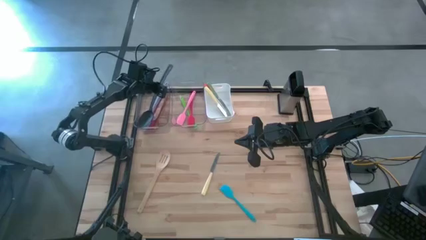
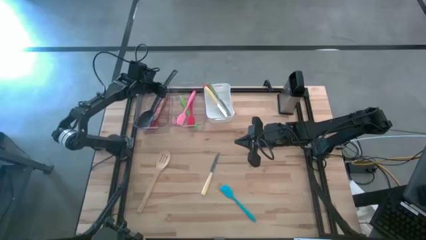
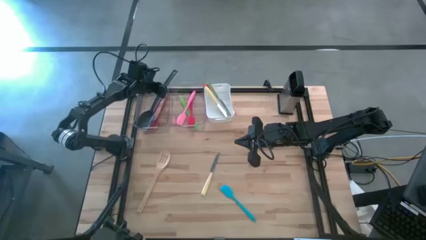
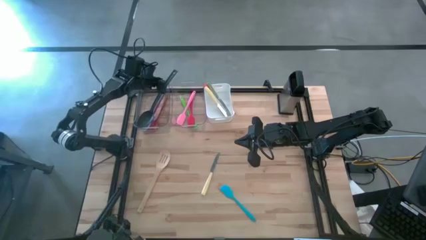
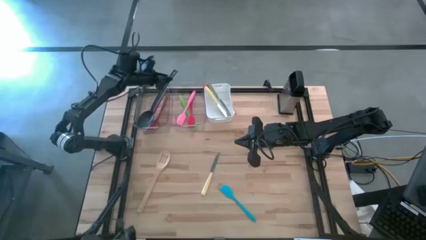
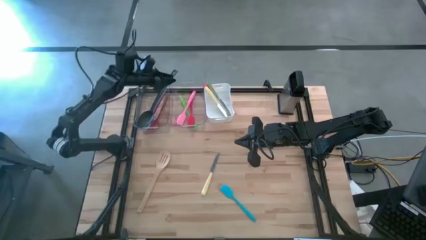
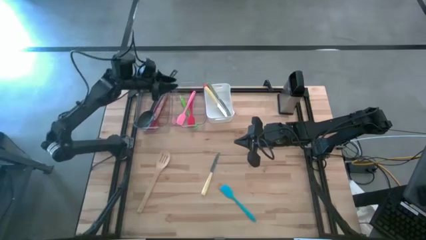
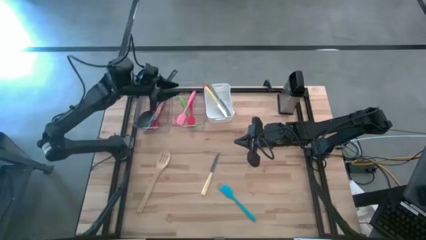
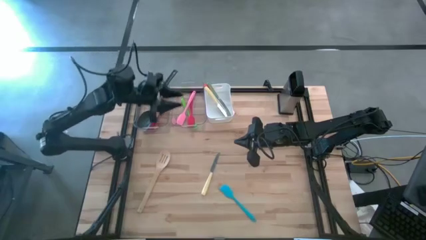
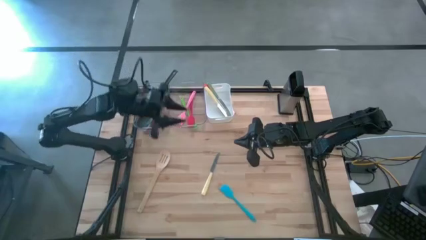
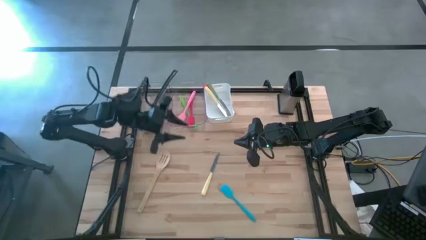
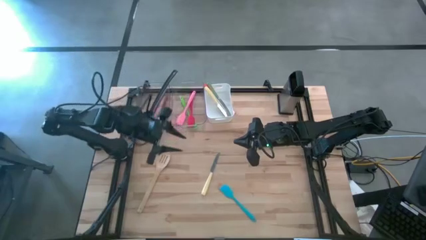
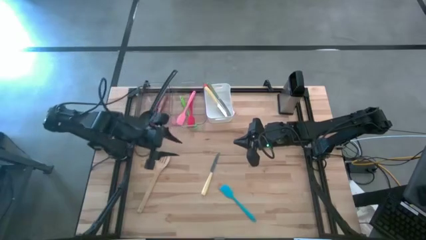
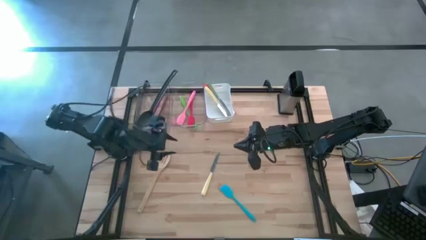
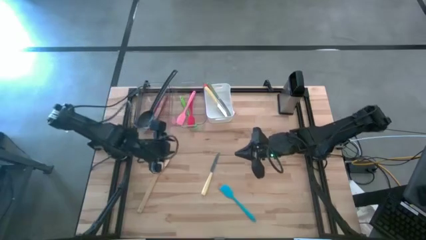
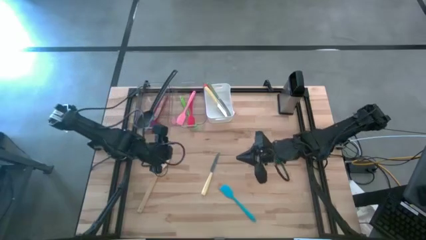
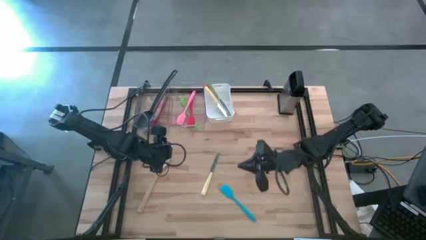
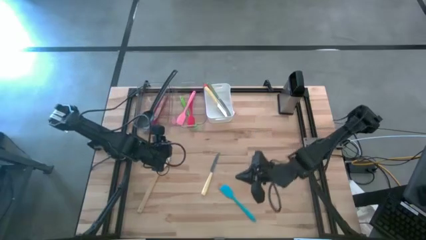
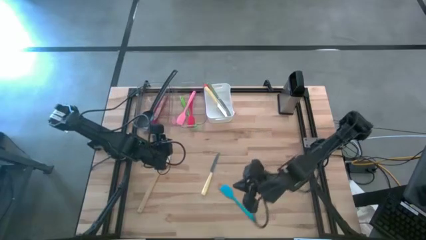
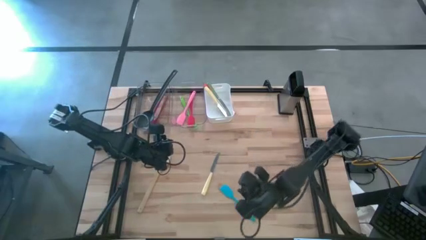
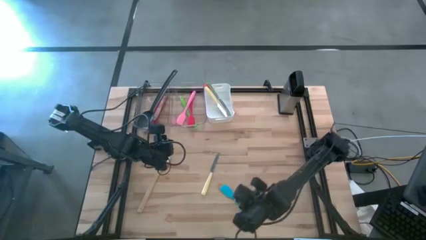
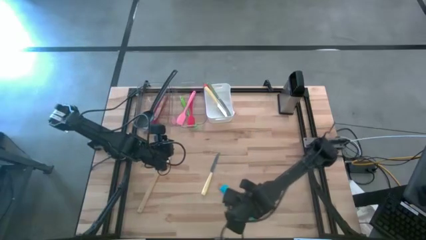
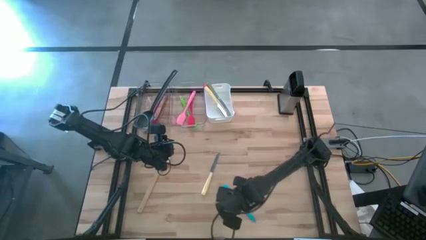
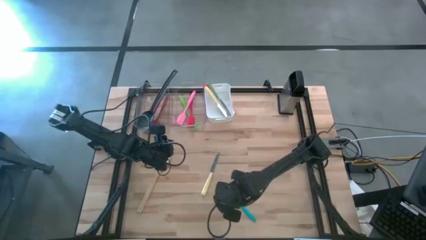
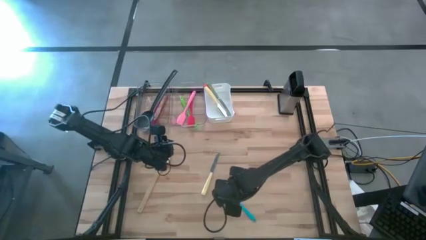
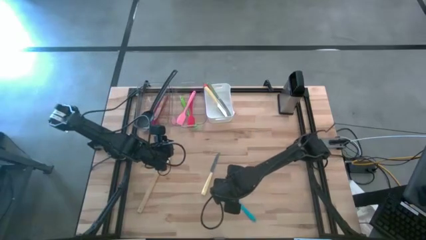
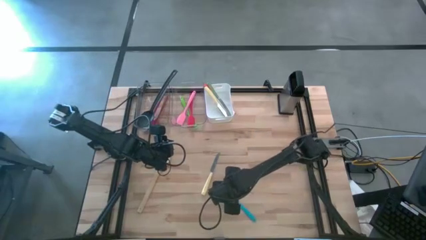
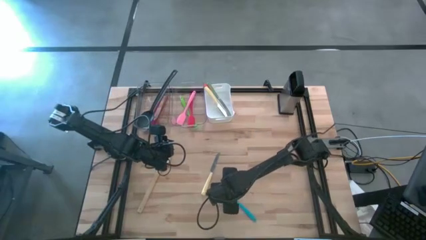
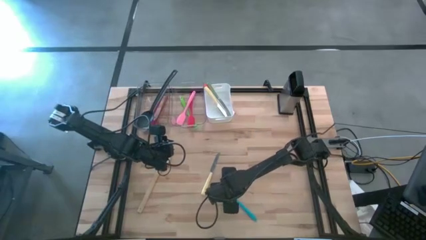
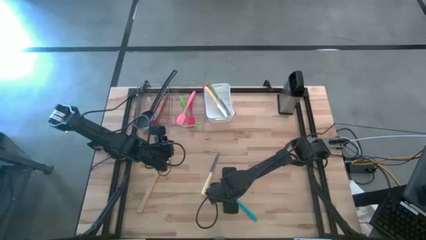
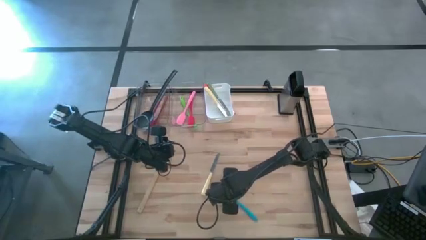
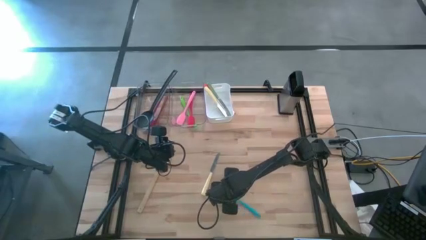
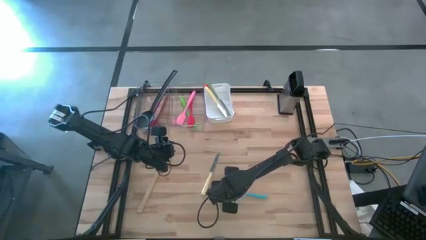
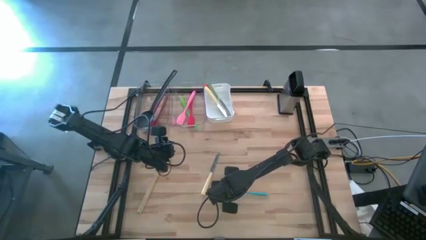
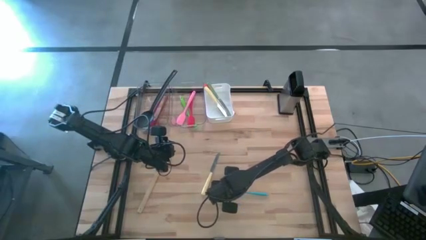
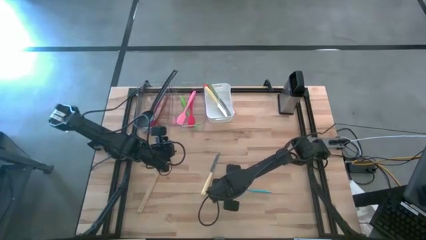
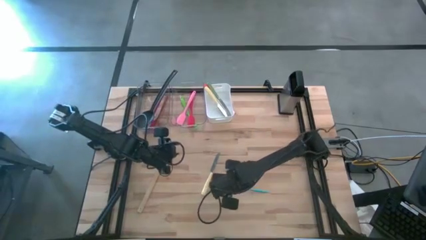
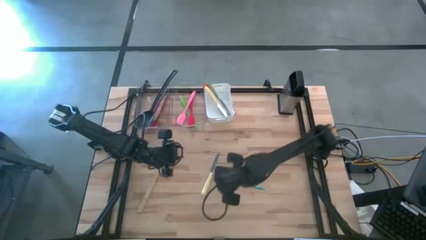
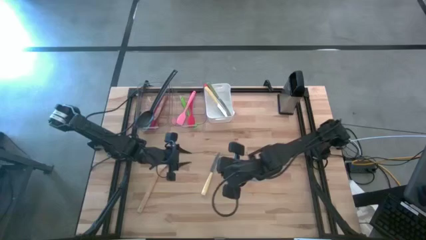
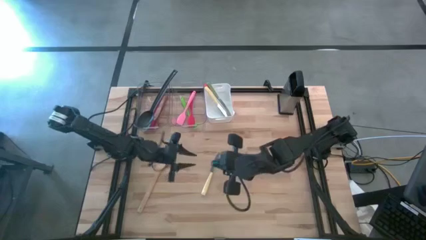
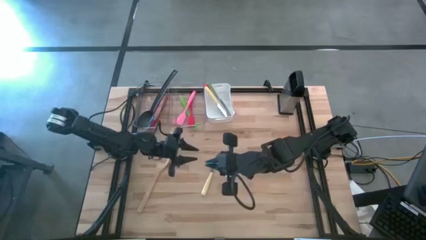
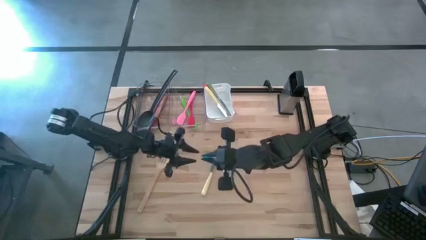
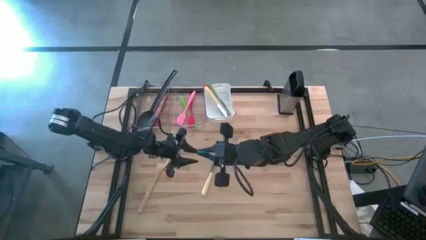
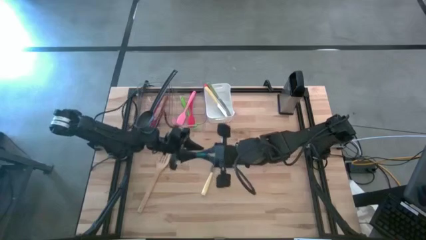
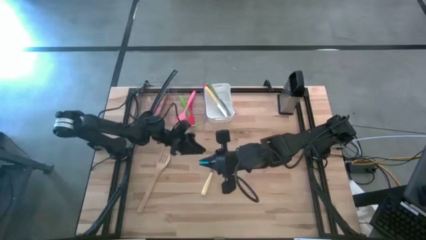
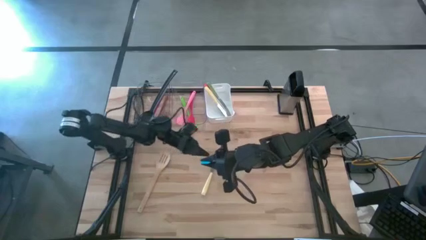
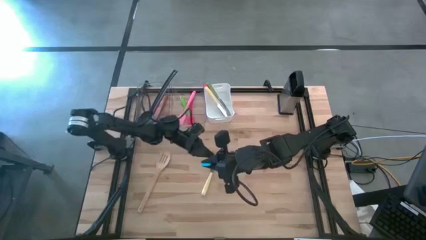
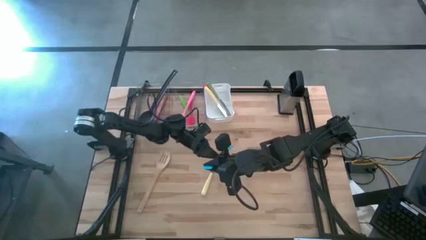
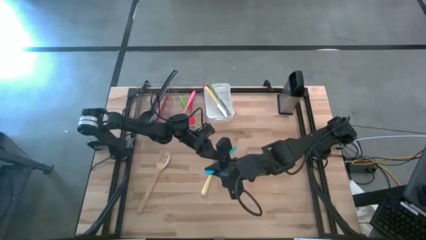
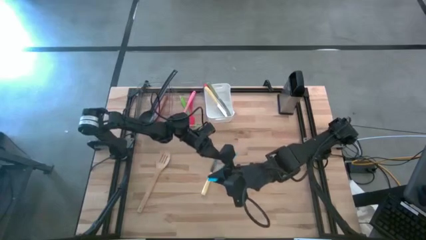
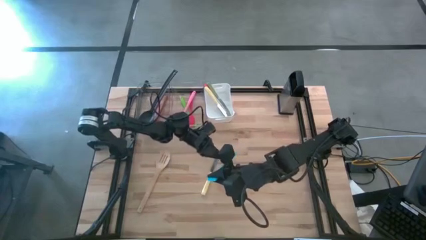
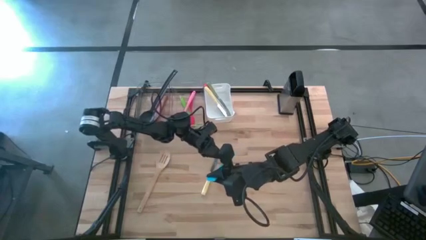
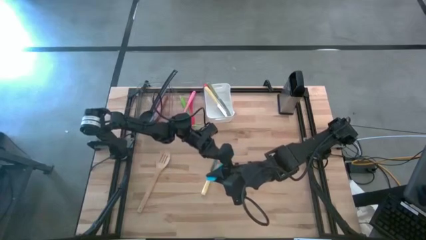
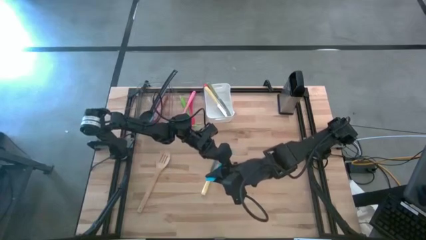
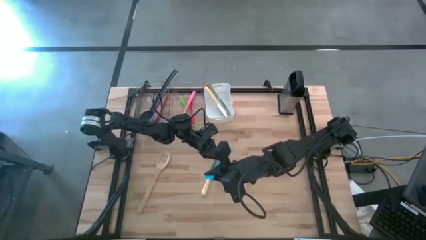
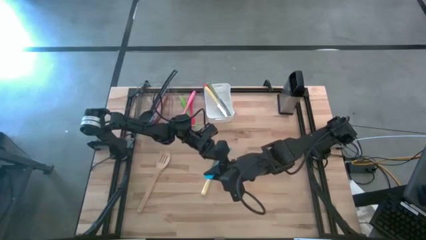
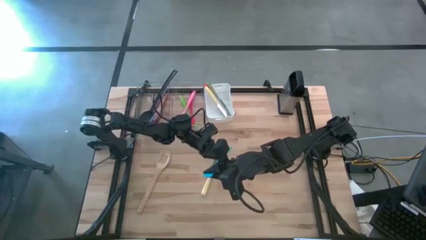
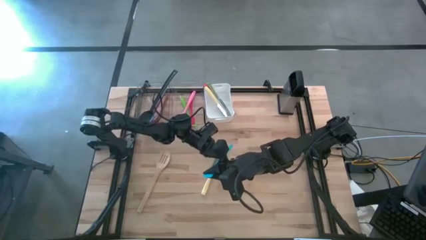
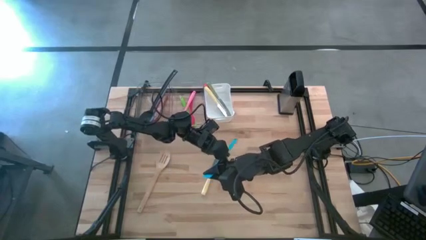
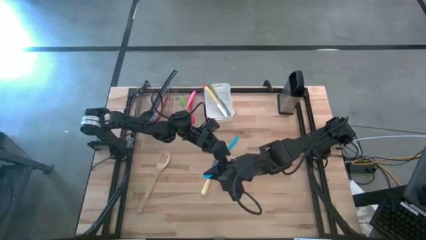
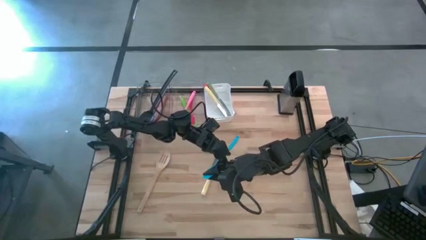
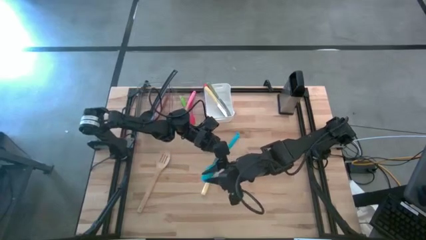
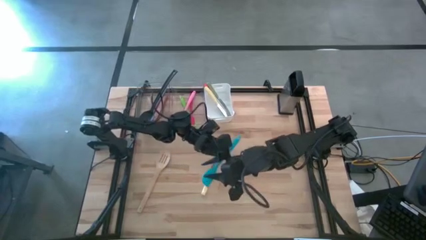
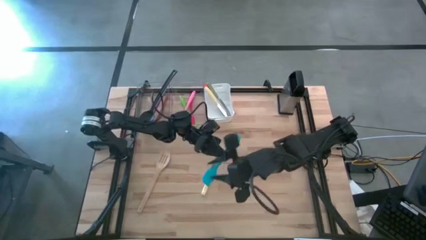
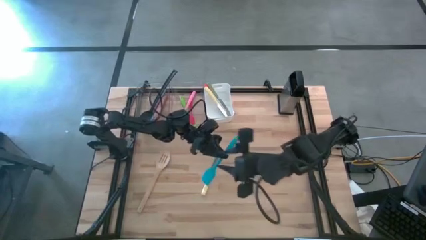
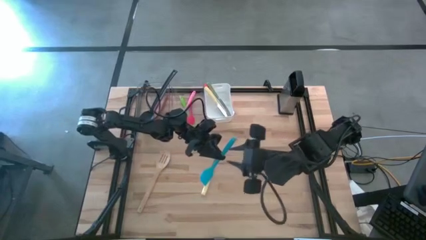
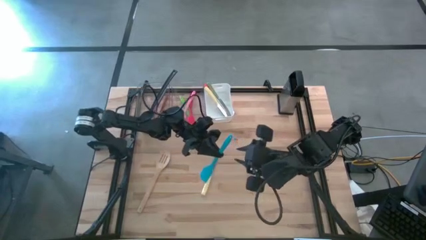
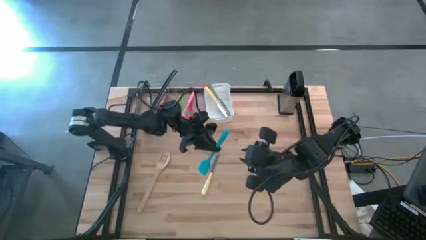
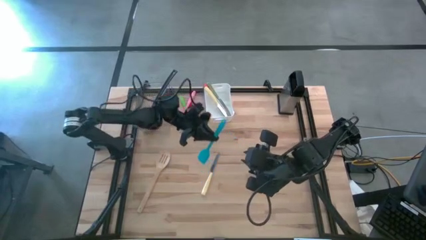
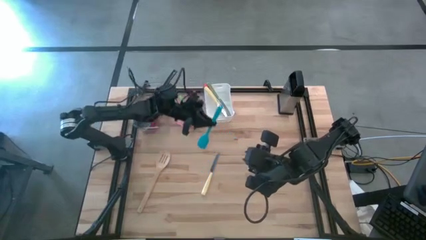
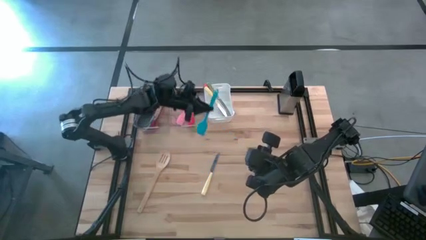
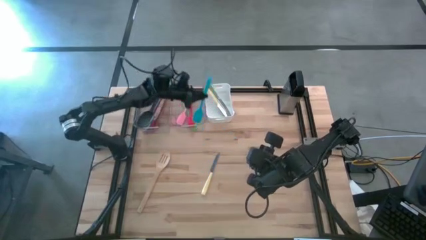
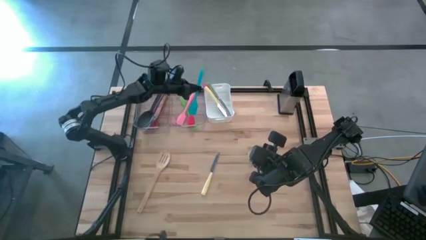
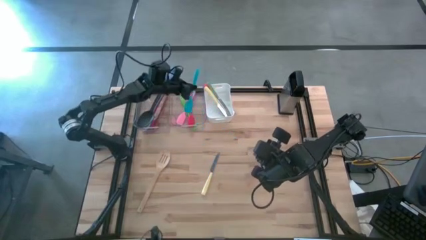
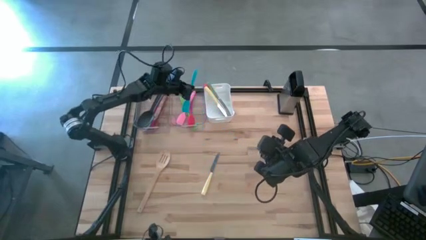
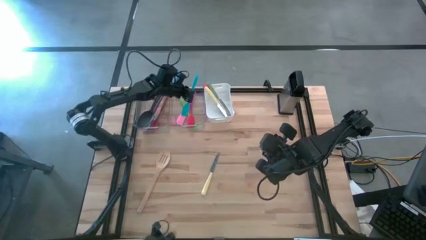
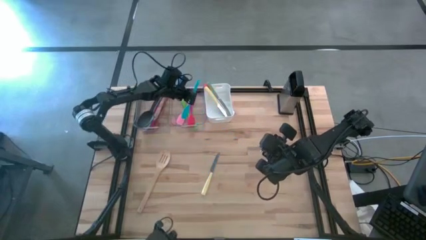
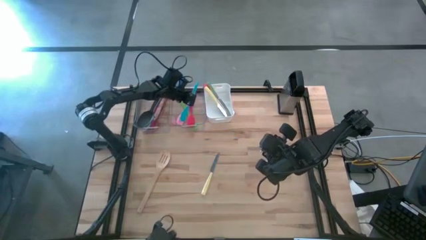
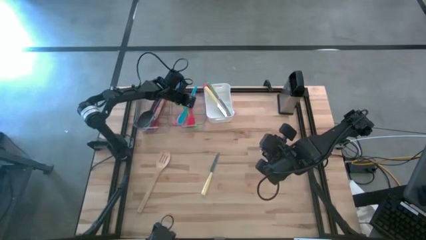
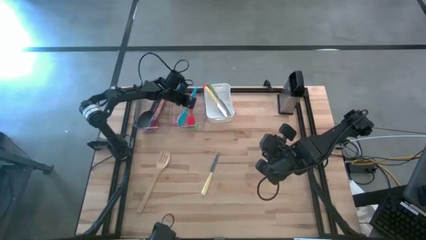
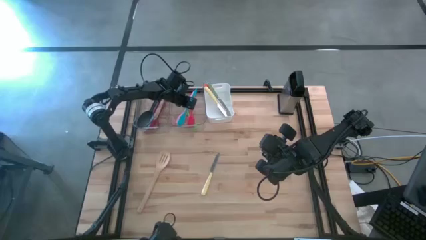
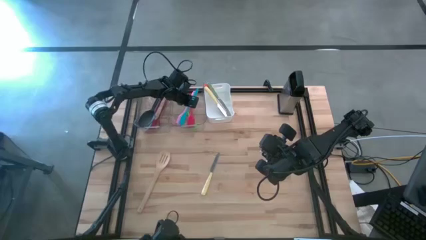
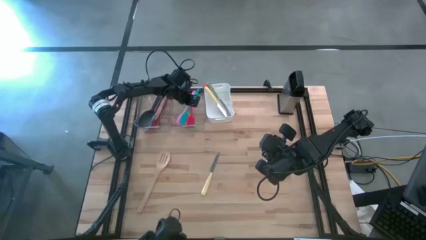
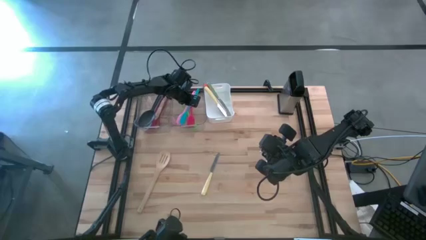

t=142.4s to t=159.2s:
Task: Pick & Place Kitchen Items
Put the blue spatula into the right transparent bin
